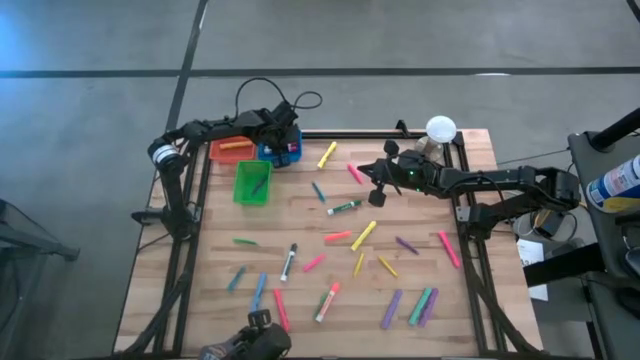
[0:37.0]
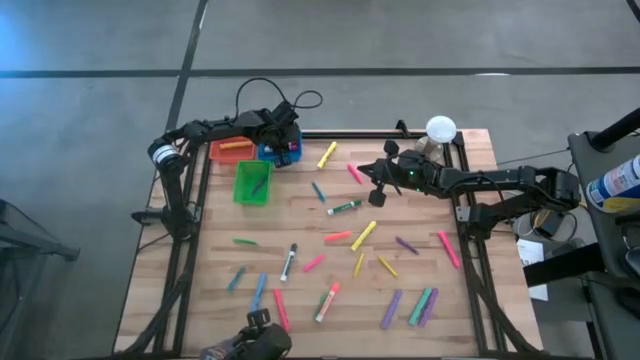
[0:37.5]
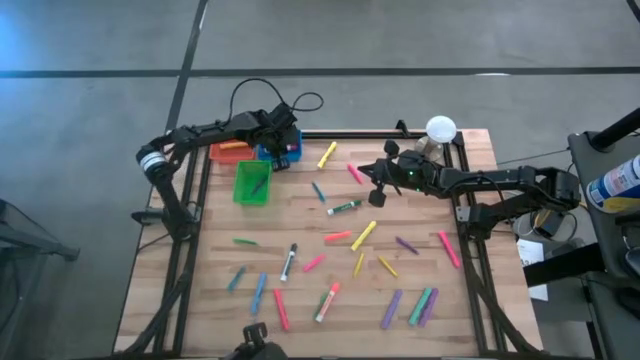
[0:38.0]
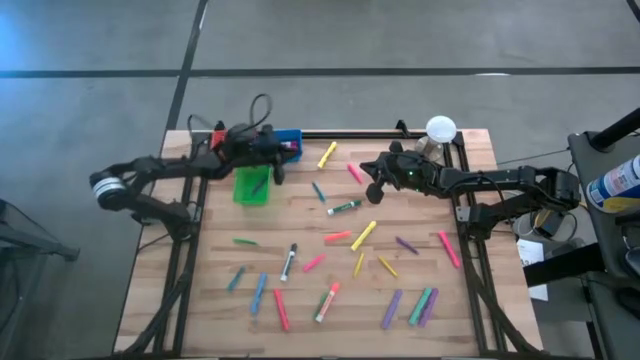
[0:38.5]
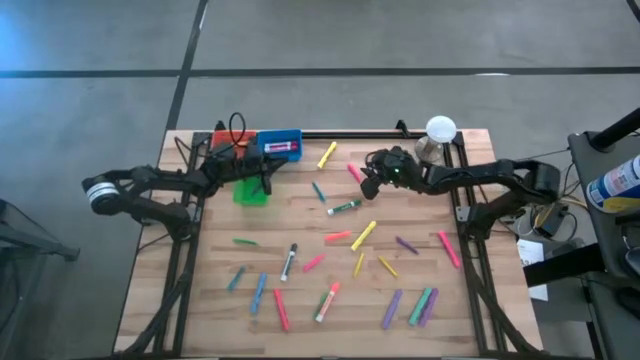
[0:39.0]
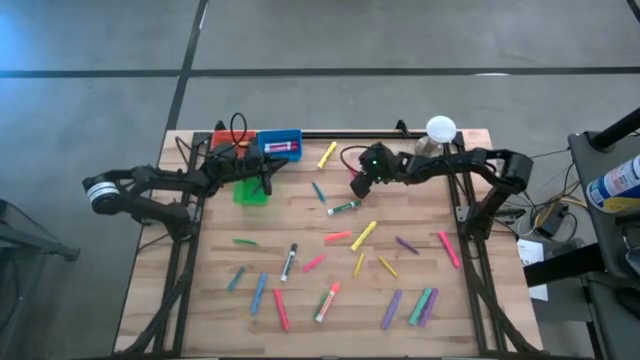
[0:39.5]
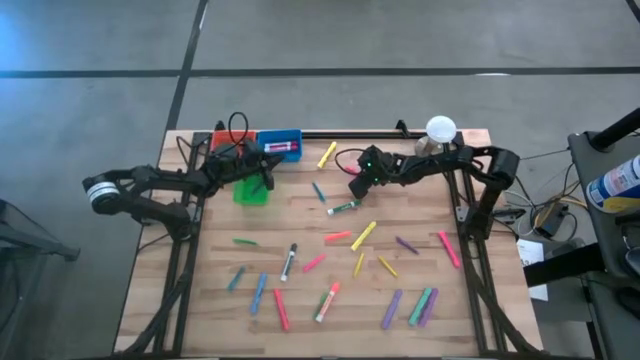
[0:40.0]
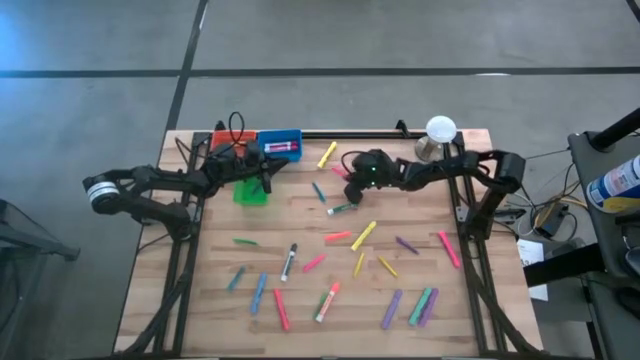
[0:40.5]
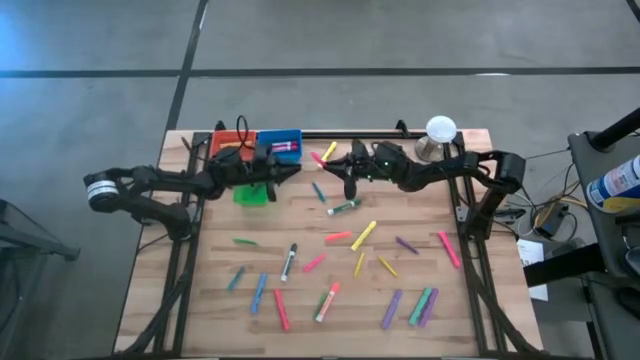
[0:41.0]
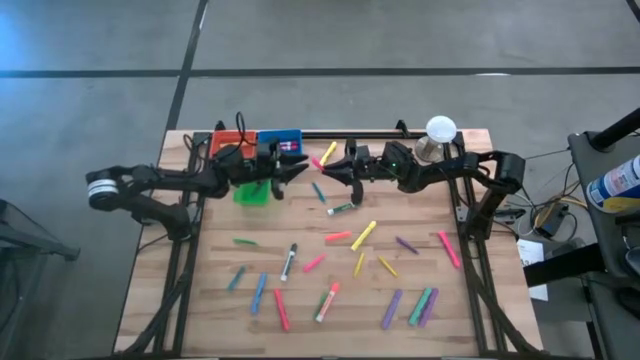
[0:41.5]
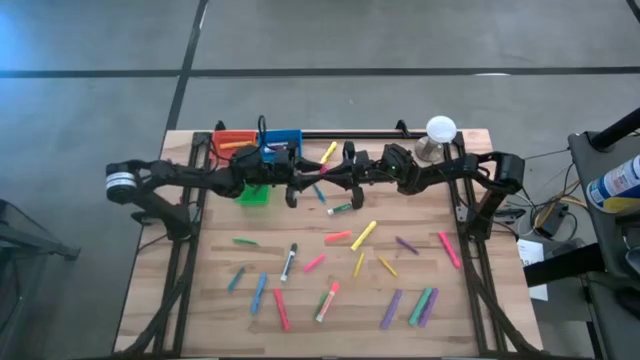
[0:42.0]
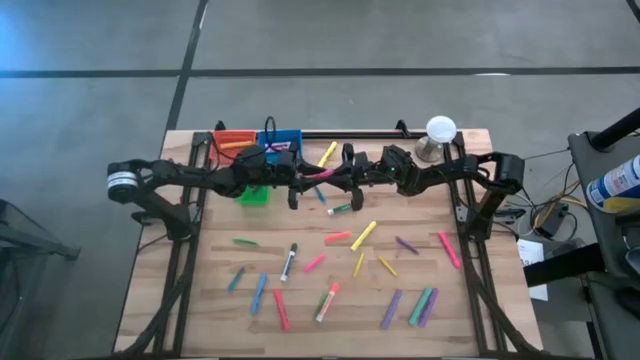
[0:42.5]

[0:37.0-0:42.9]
Task: Pick & Place Markers
Put the pink pen into the green bin

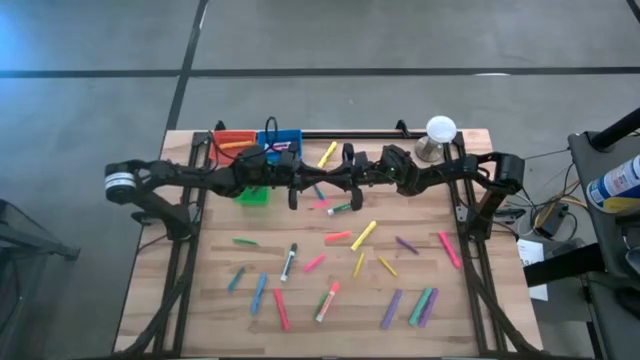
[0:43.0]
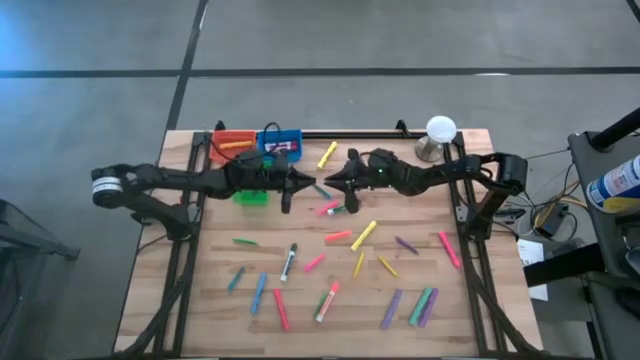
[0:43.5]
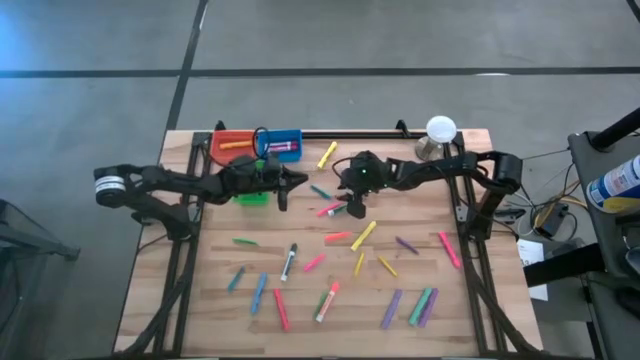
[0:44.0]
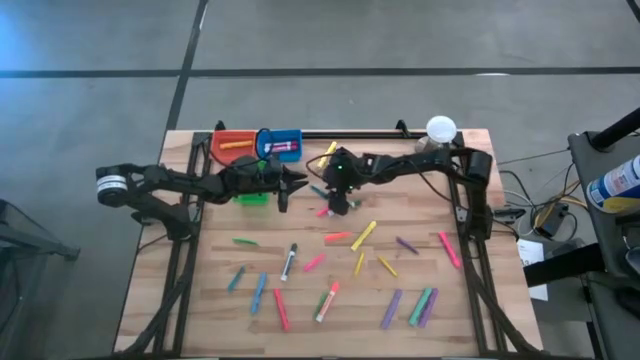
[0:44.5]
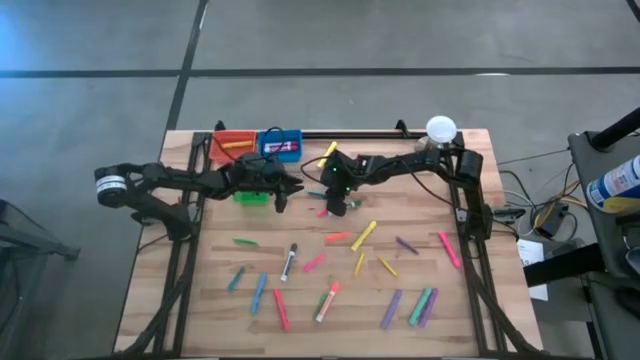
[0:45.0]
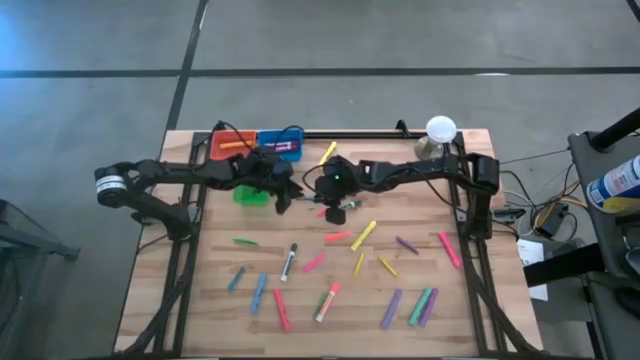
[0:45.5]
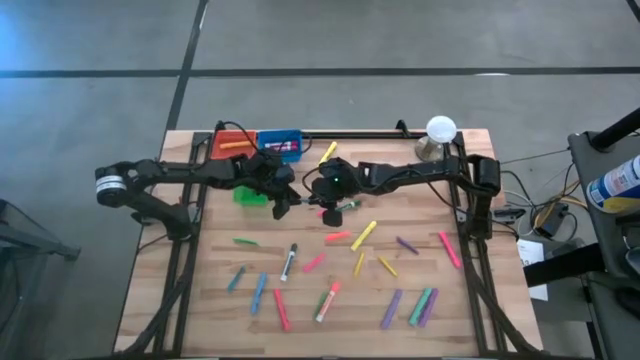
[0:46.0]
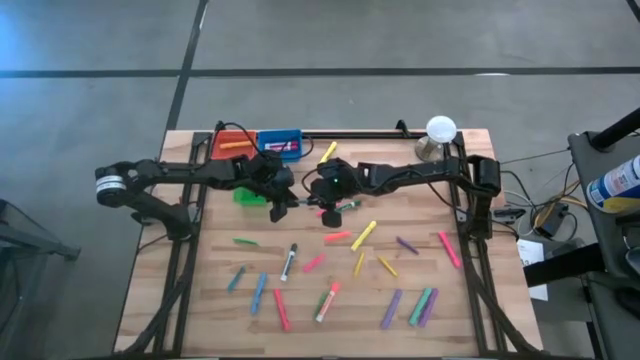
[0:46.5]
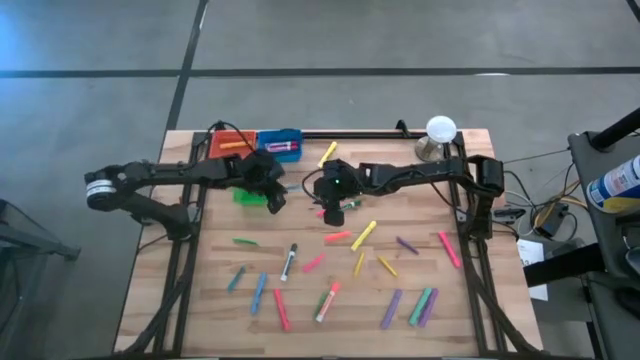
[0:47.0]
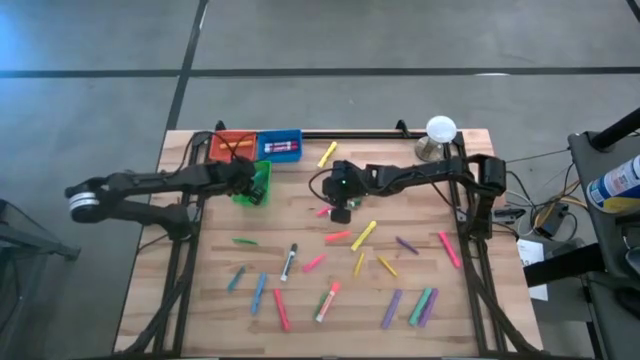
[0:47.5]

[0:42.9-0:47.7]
Put the blue pen into the green bin

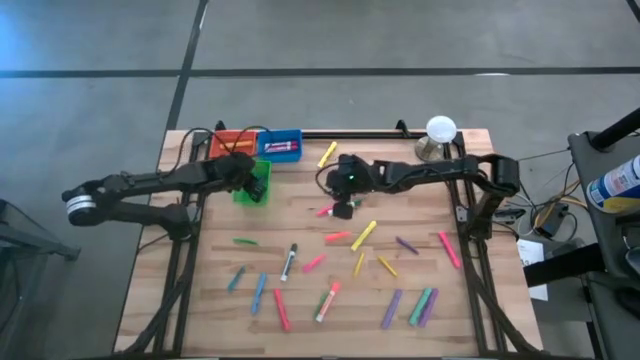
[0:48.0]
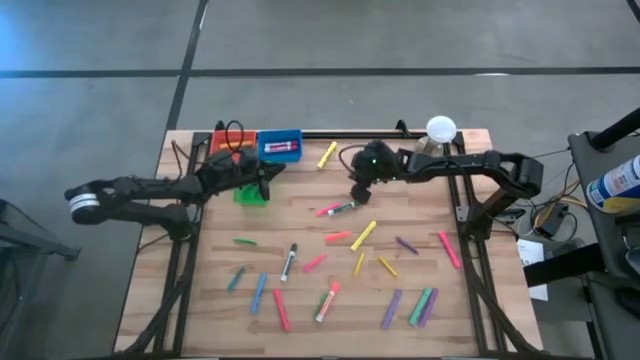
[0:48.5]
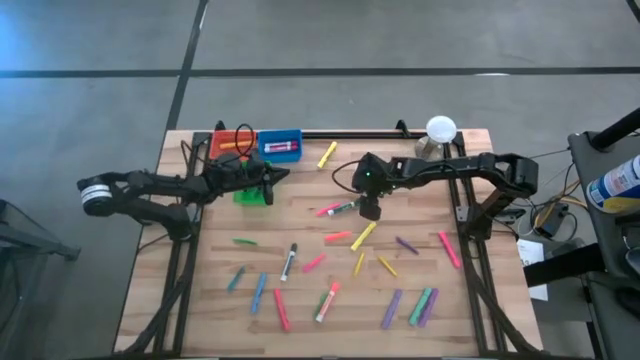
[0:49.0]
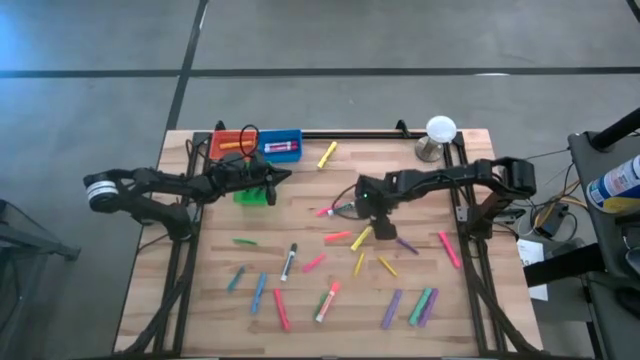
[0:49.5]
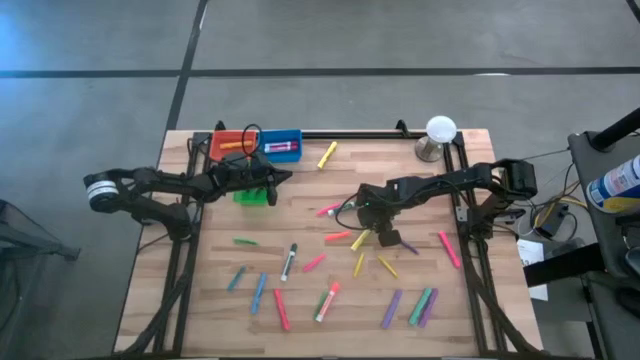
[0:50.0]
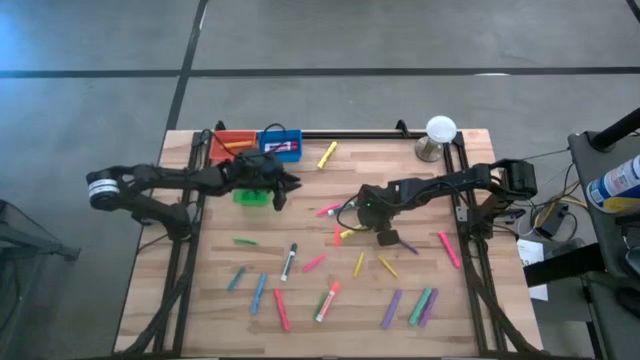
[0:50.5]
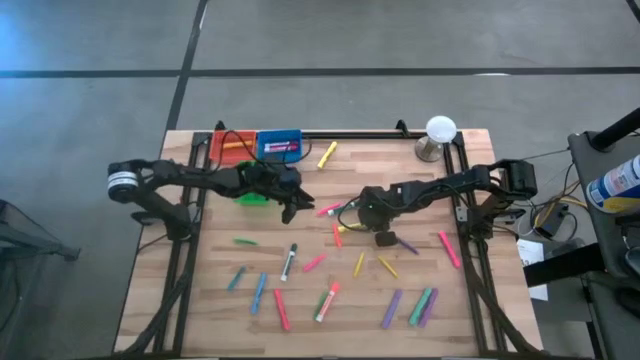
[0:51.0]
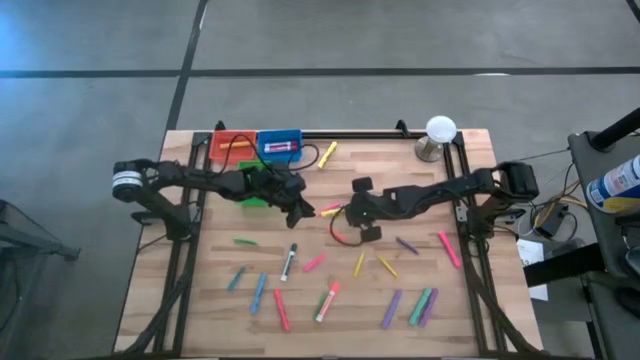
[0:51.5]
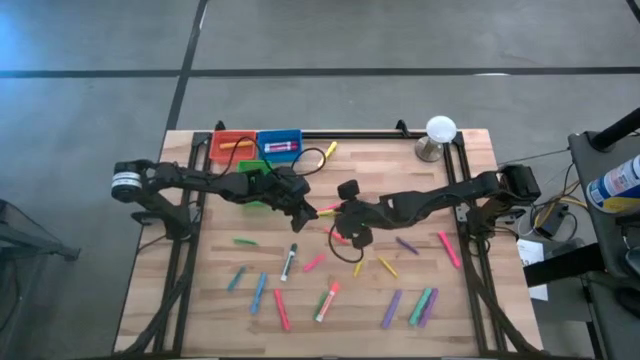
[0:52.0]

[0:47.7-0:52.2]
Put the yellow highlighter into the orange bin

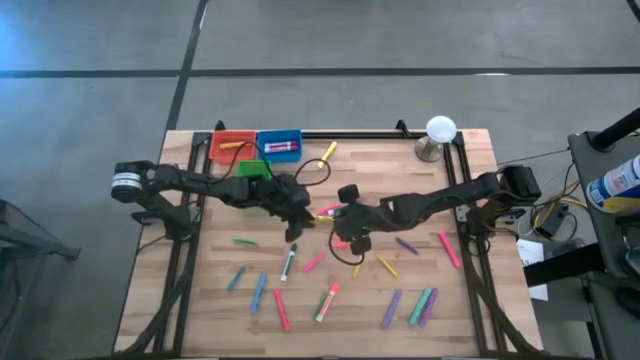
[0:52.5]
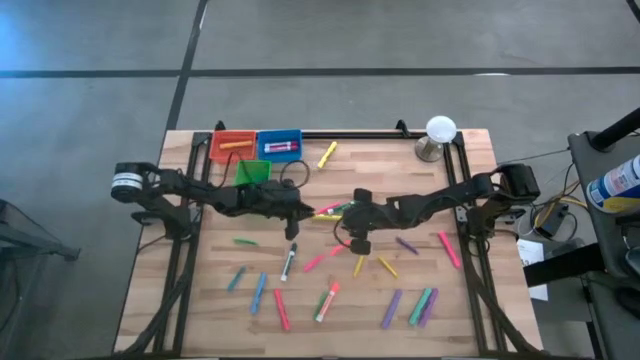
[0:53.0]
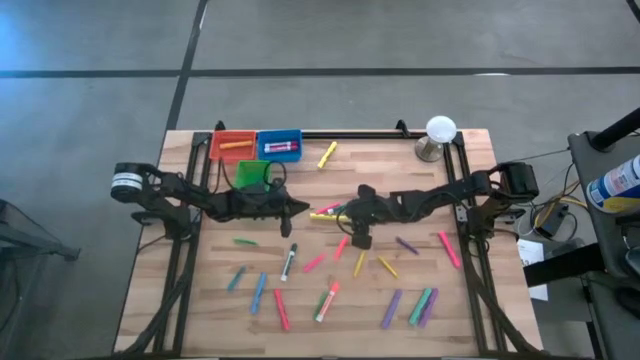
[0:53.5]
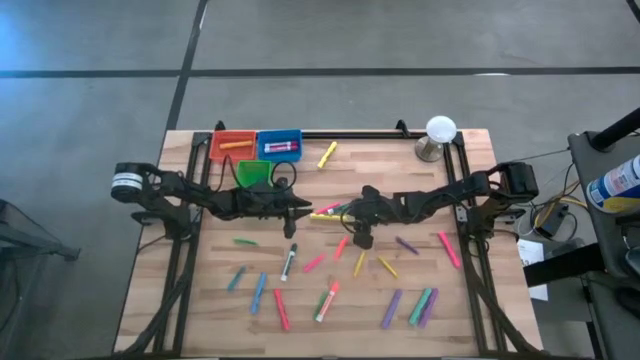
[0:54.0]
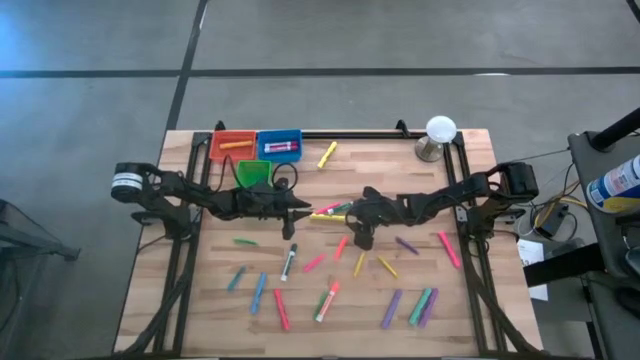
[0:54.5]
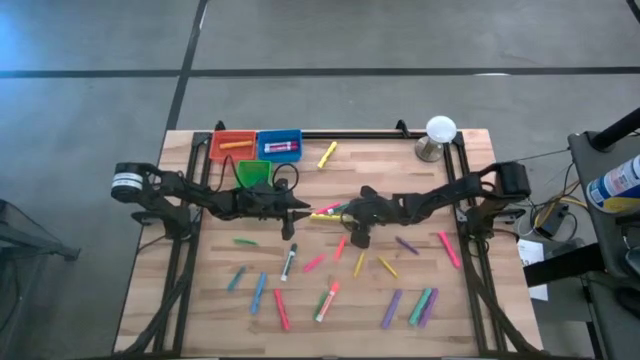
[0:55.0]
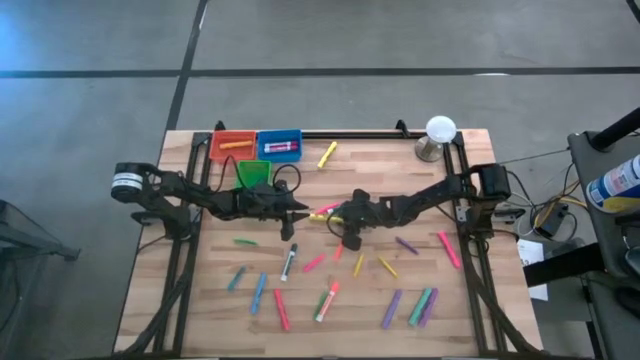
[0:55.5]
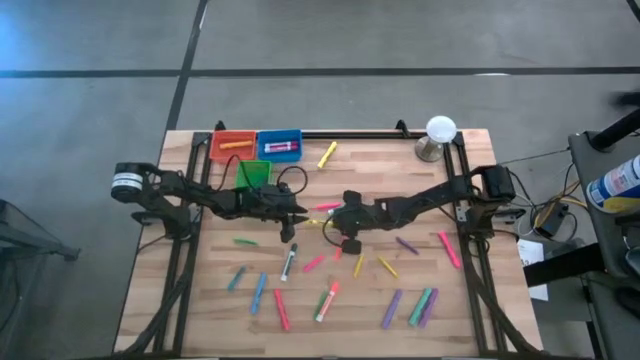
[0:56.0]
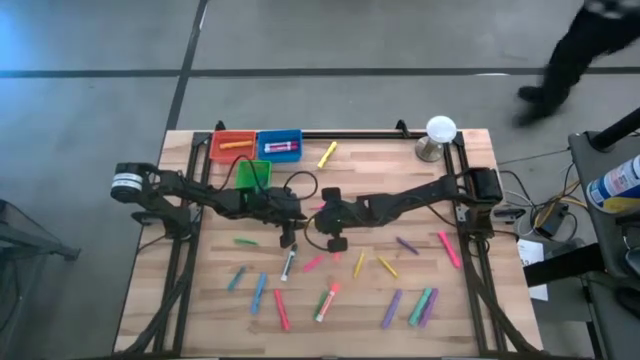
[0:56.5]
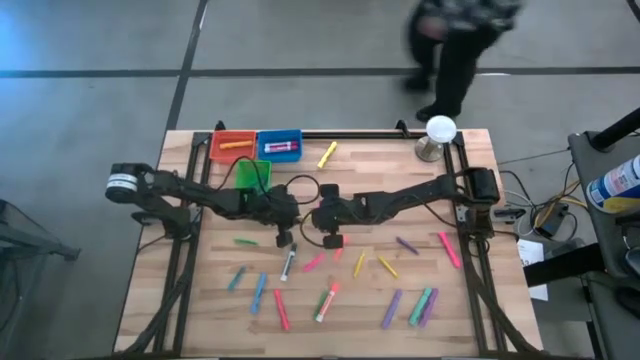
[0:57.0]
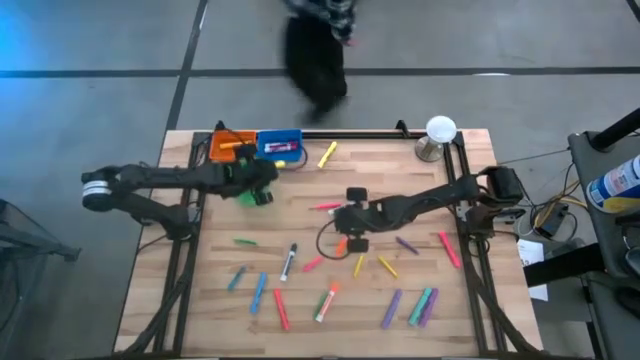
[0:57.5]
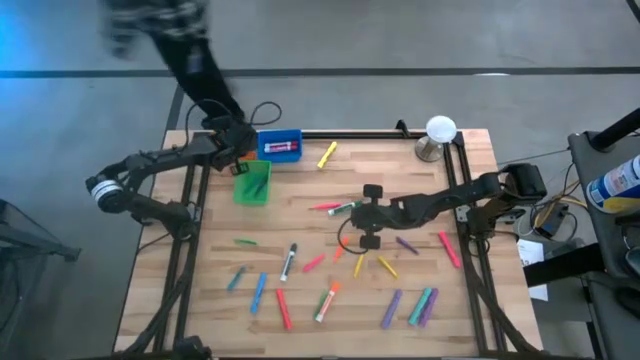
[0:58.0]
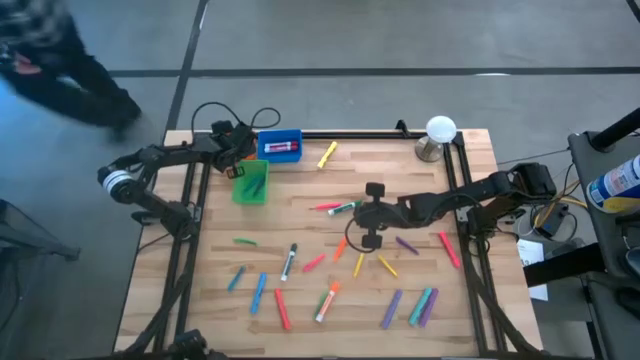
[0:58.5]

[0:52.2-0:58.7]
Put the yellow highlighter into the orange bin
